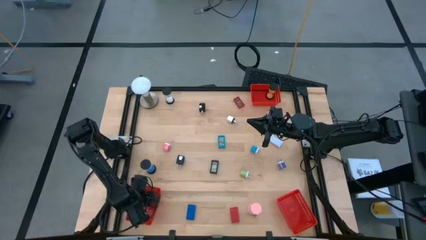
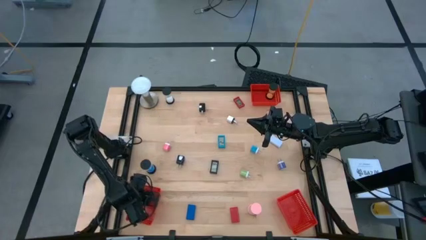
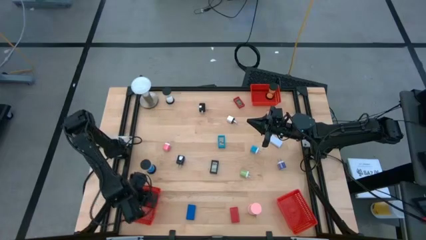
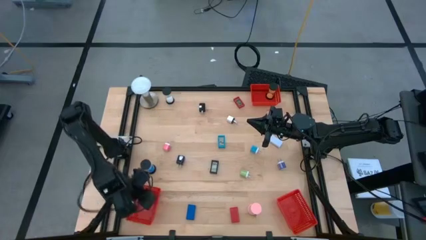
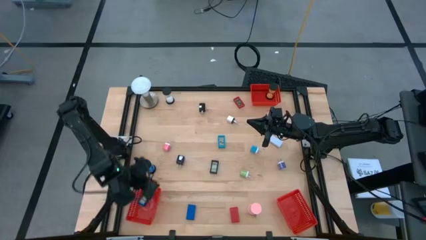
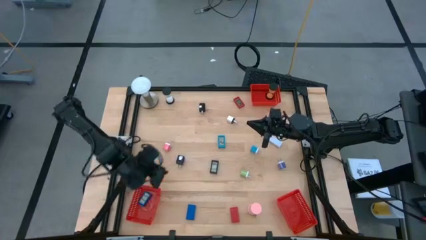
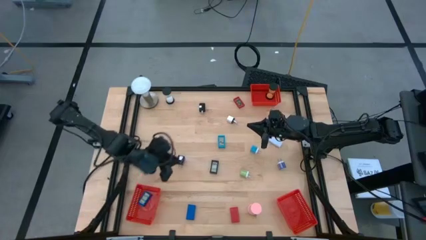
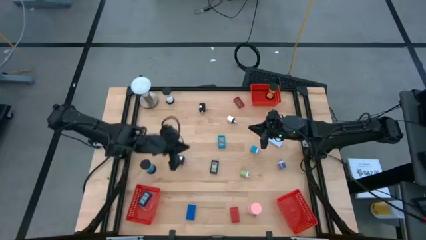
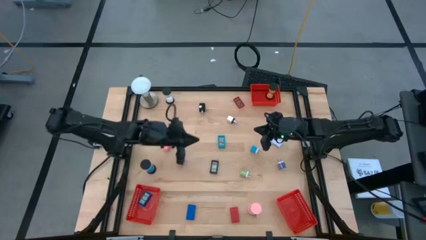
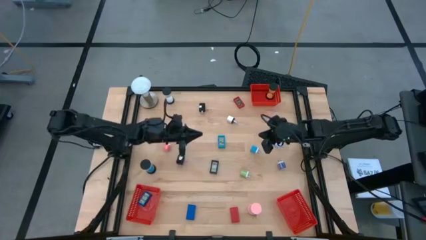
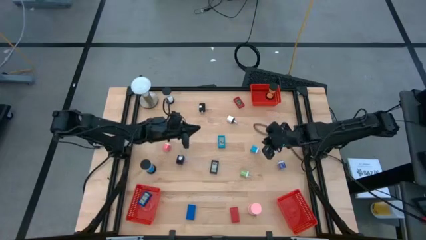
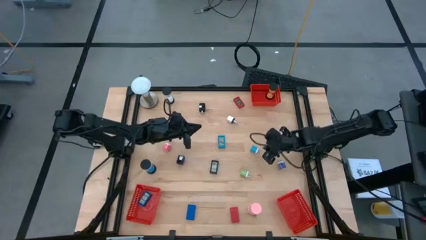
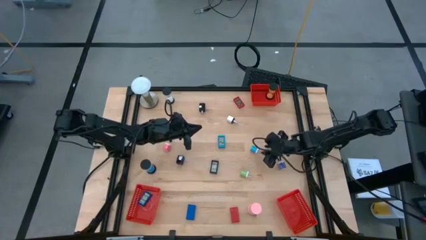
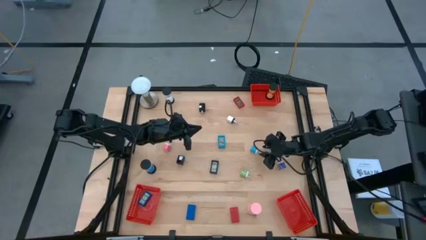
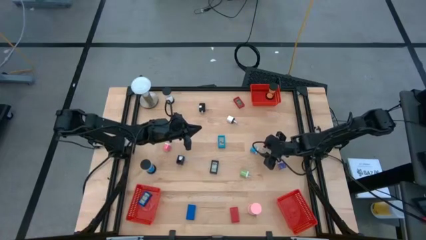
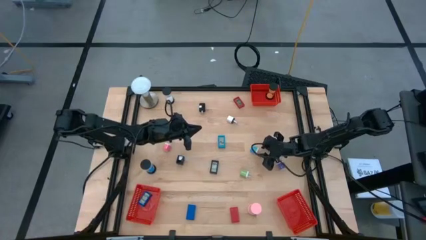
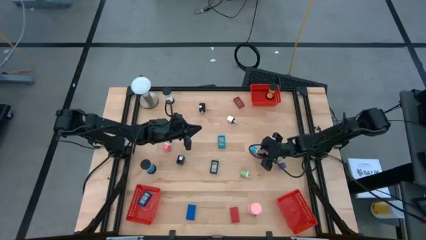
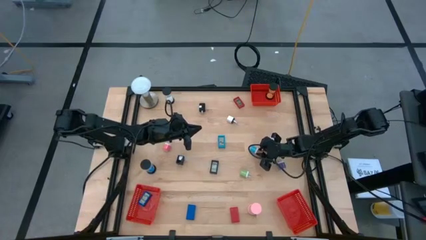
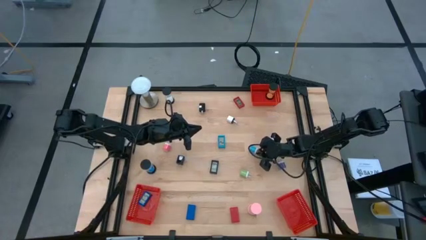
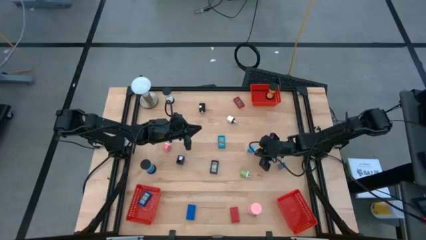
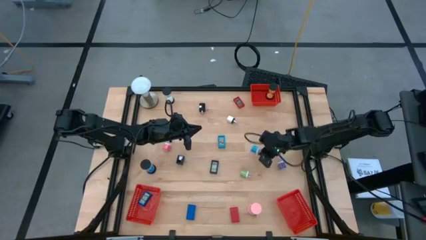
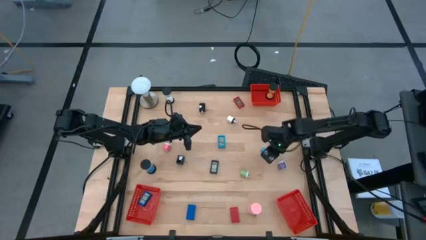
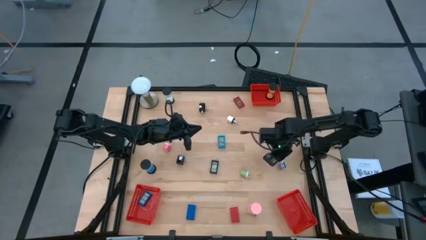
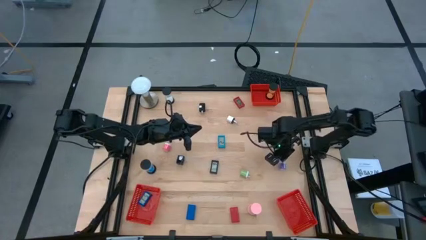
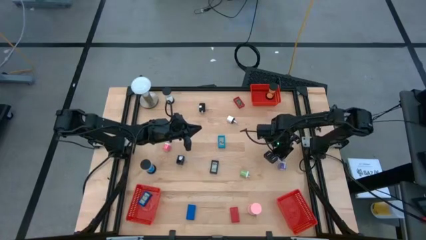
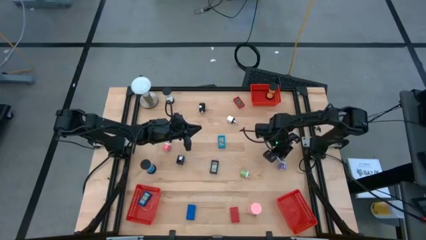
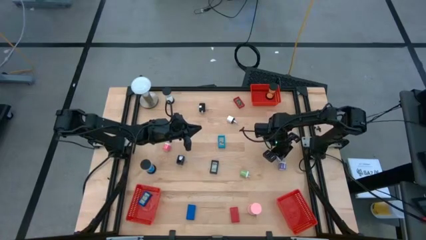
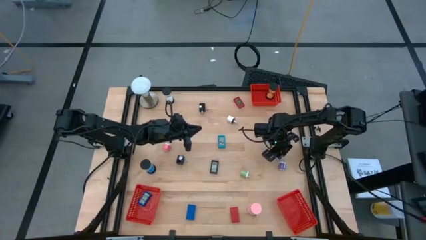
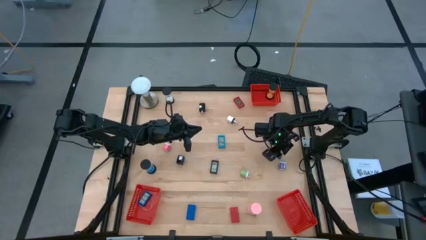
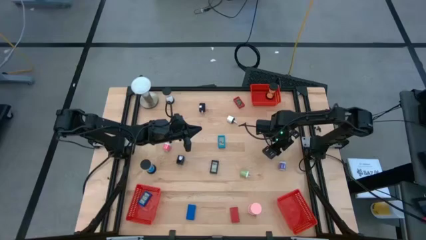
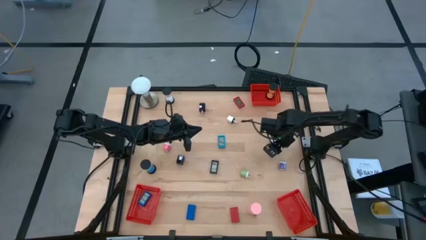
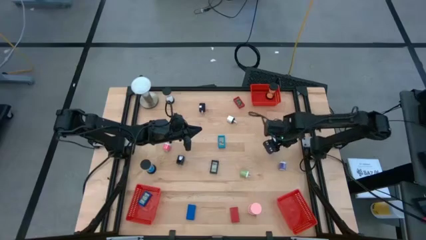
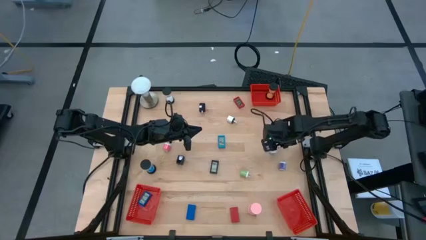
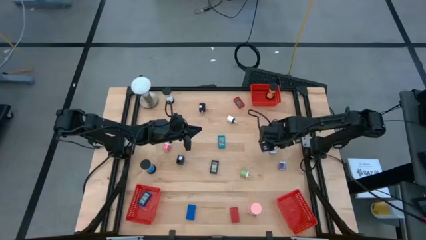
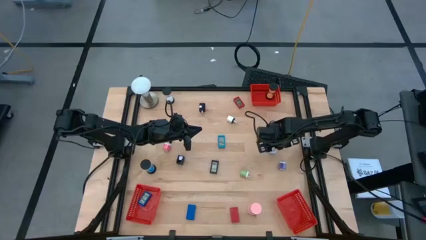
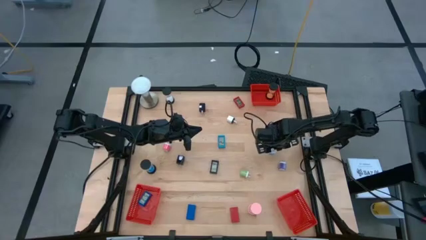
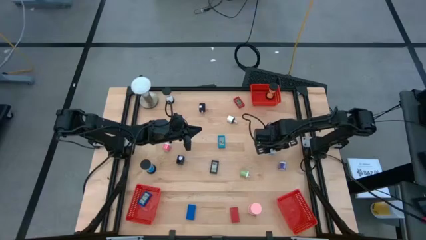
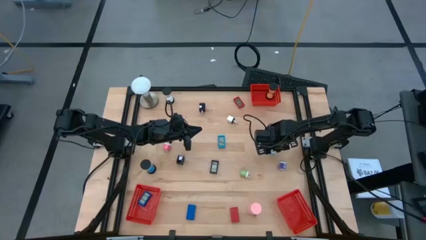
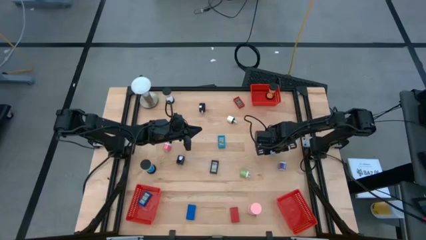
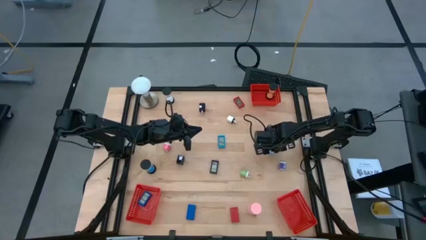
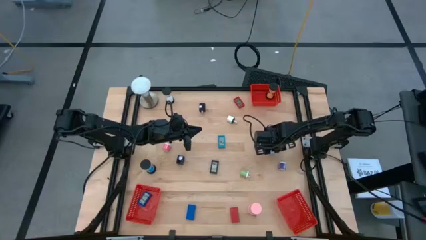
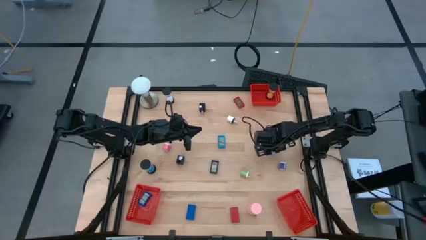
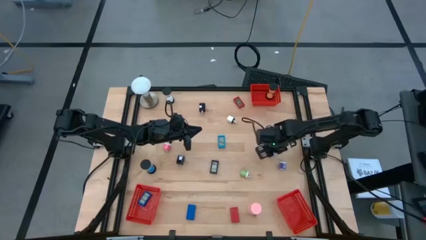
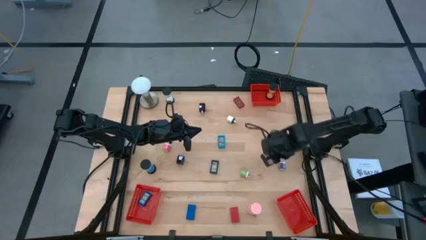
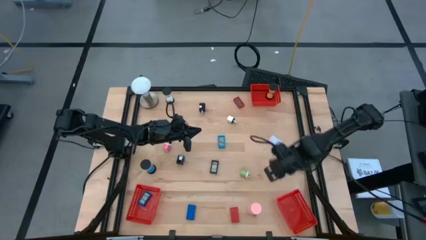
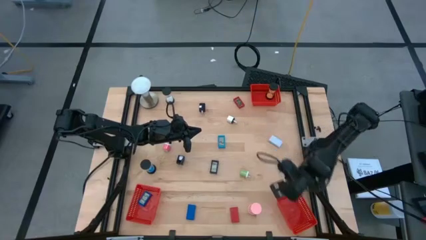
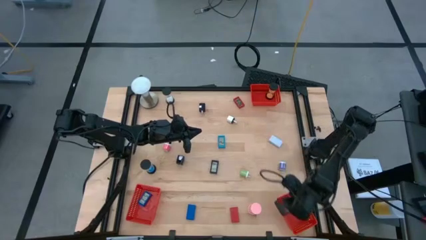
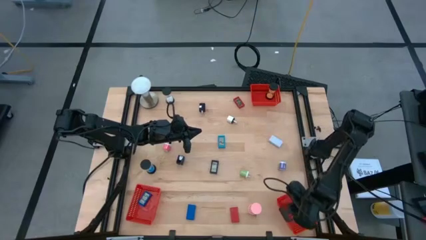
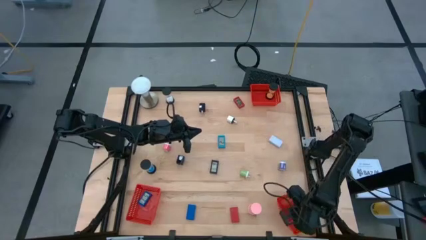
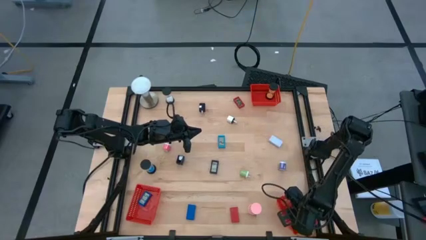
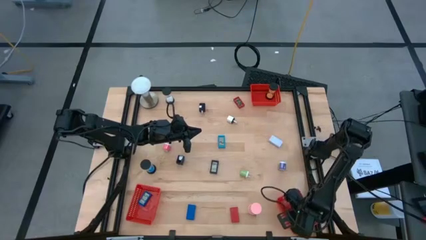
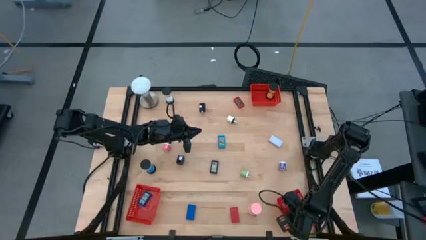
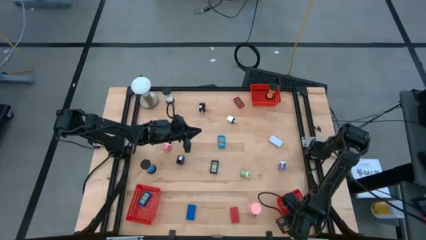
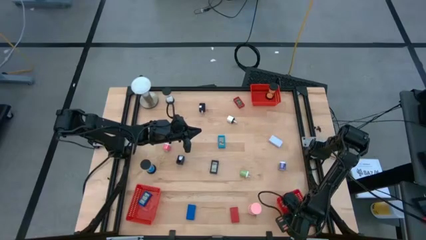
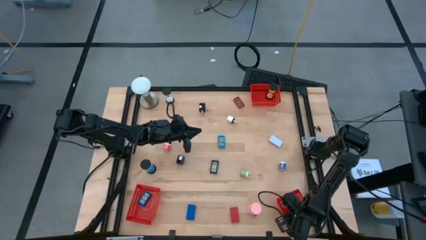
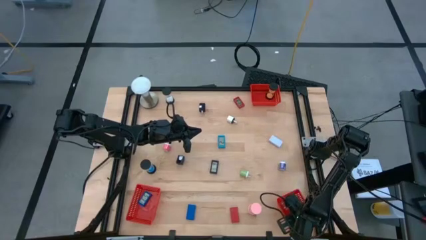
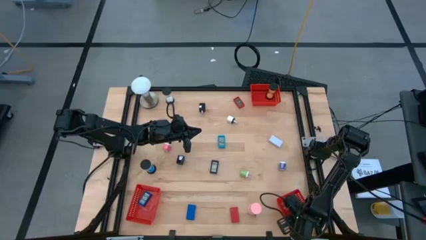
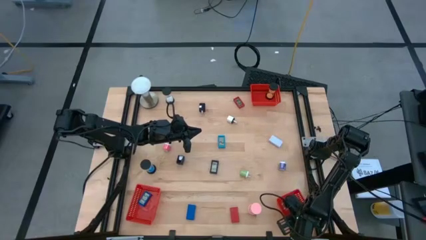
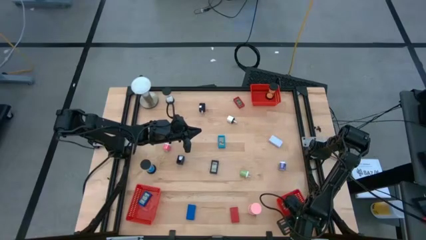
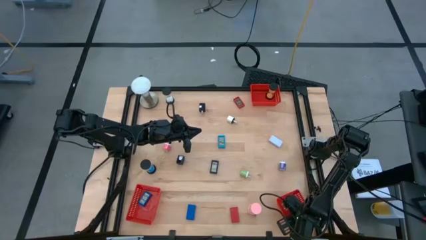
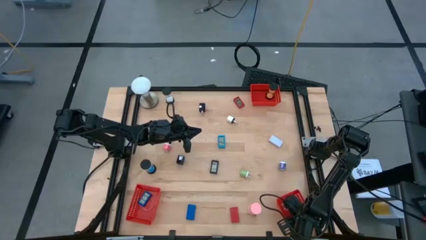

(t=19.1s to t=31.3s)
Task: Pick & Place Office items
Put the light blue charger adapter into the bottom right red basket

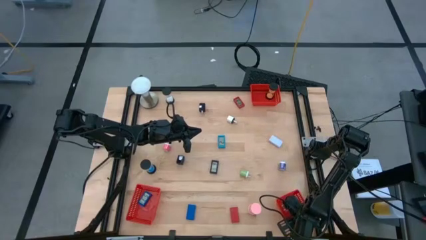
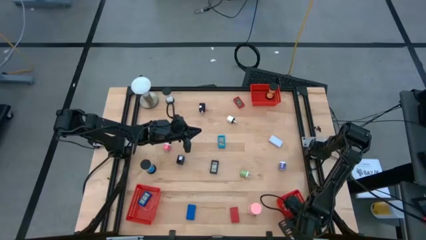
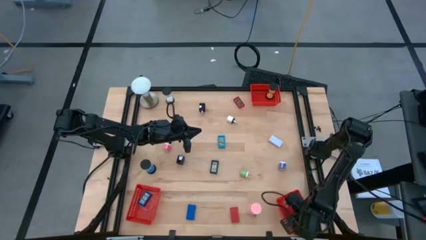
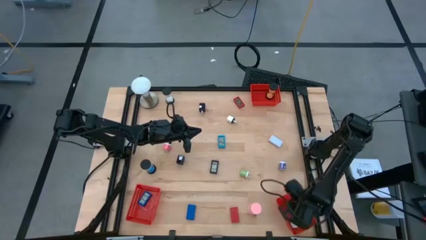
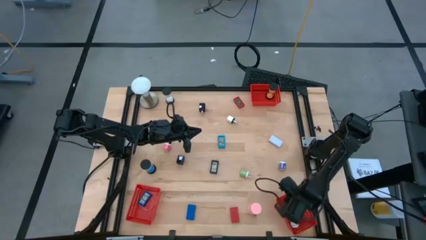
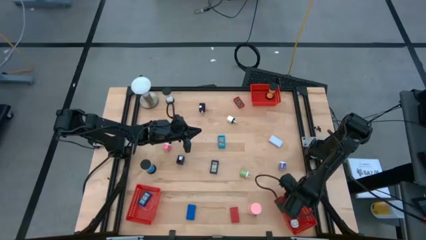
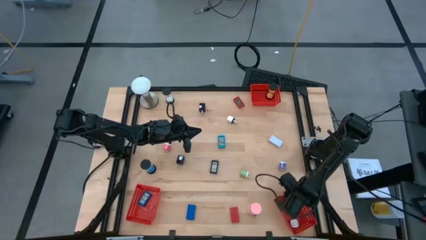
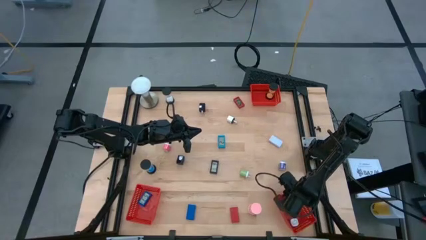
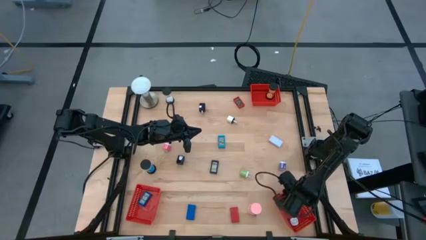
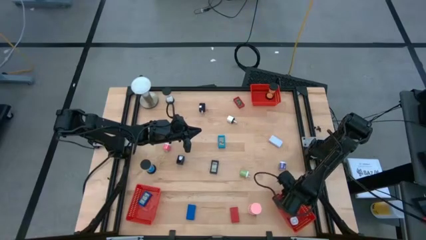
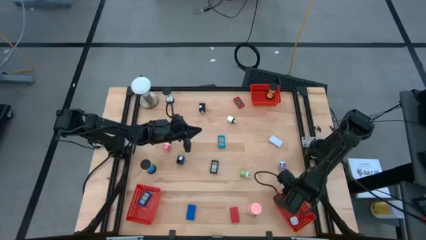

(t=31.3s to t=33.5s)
Adjust the bottom right red basket on the table

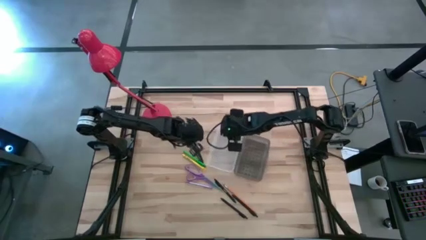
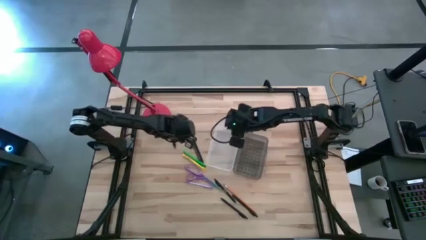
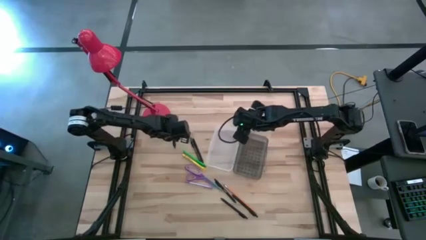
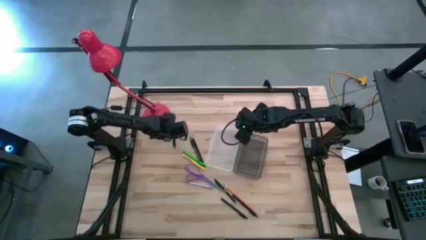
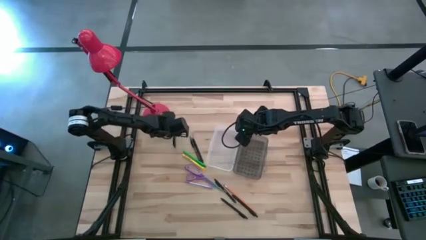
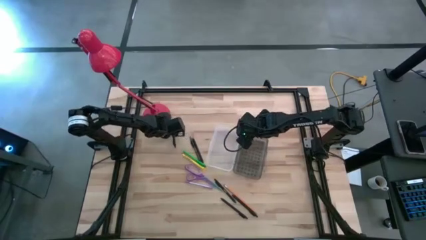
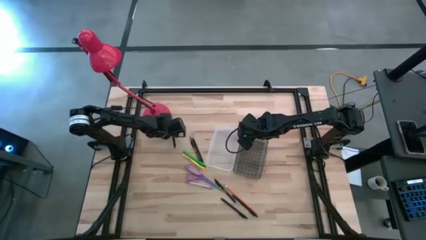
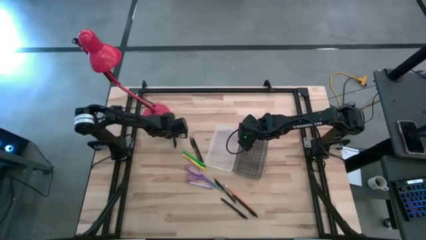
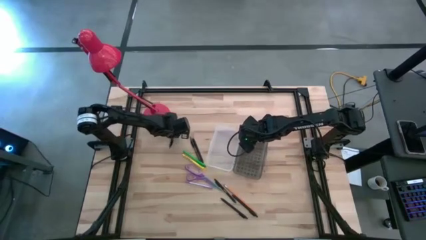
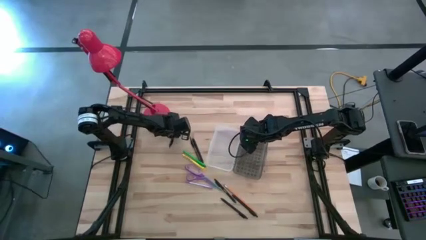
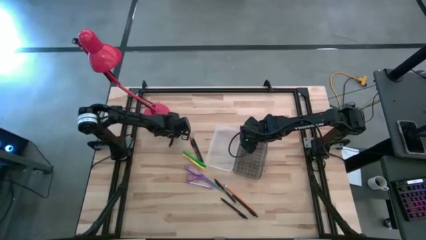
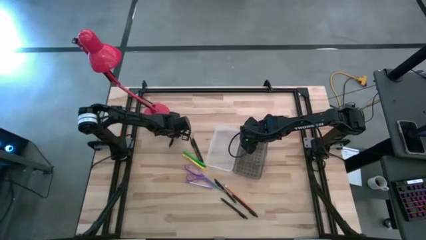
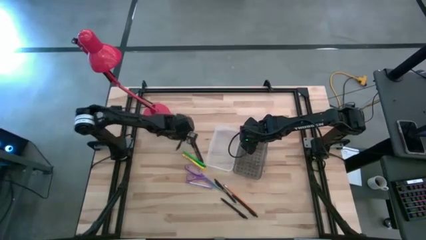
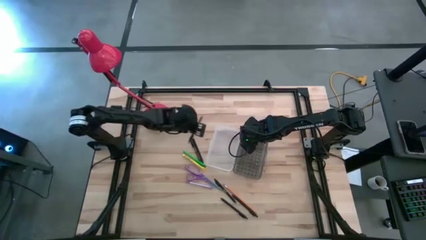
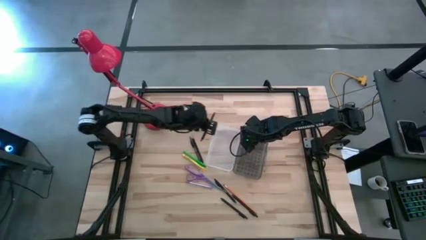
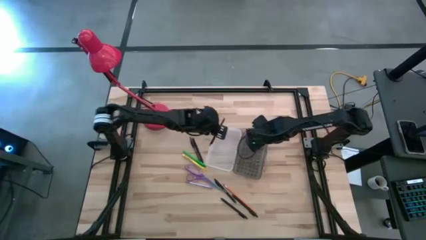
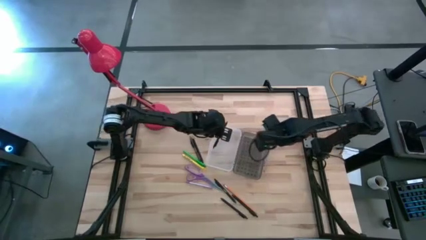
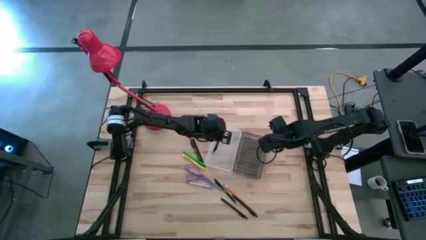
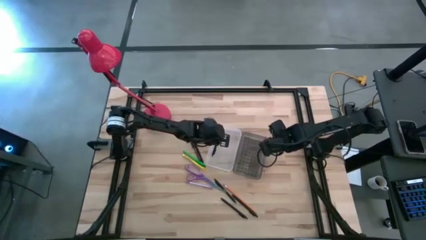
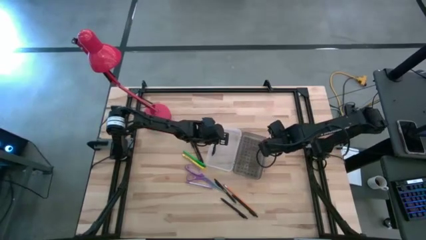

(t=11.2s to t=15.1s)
Task: Pick & place school supplies into a supply box
Put the black pen into the supply box
